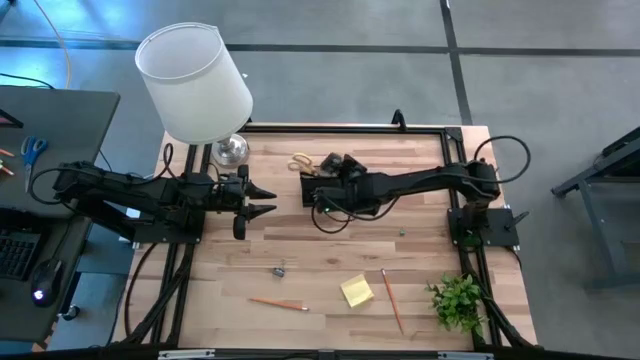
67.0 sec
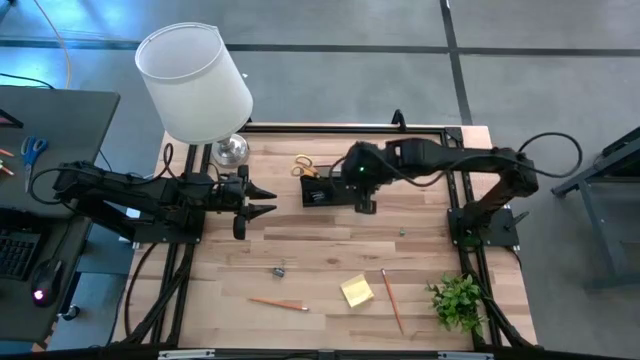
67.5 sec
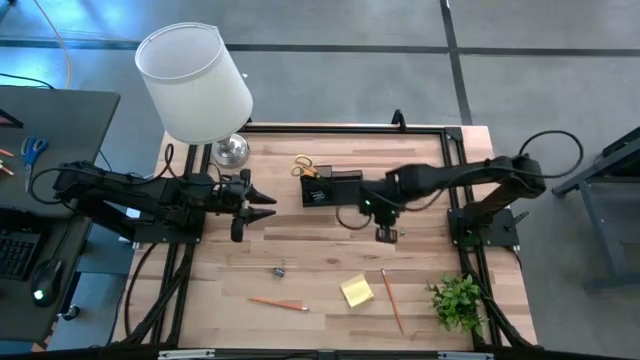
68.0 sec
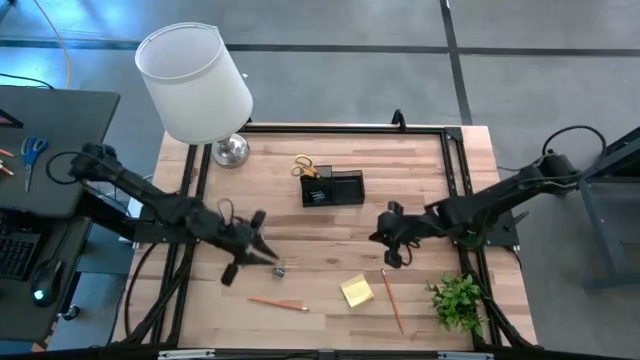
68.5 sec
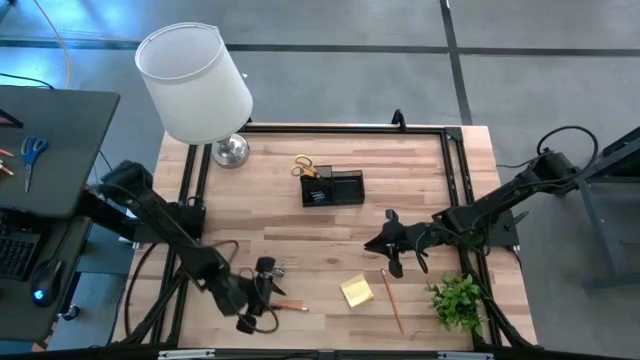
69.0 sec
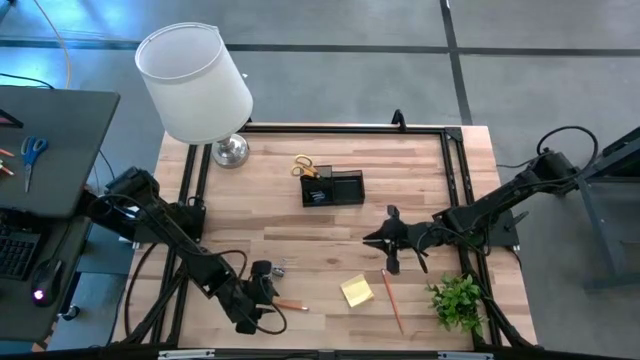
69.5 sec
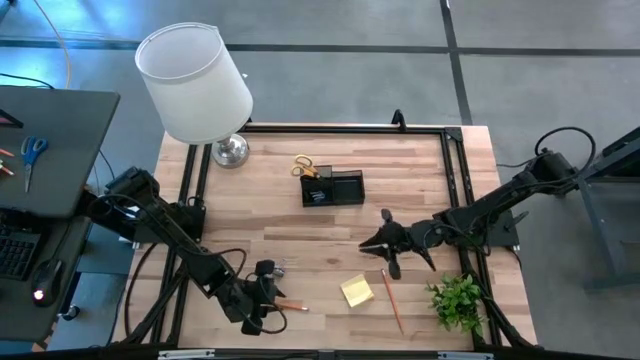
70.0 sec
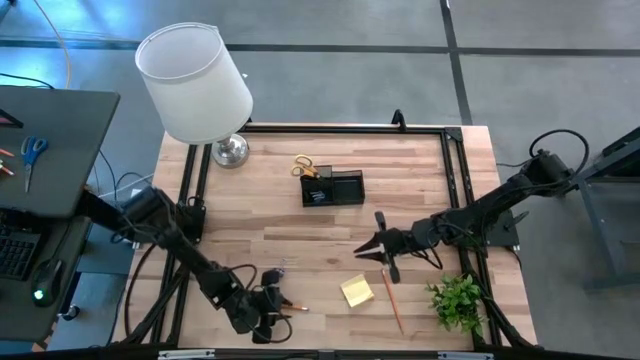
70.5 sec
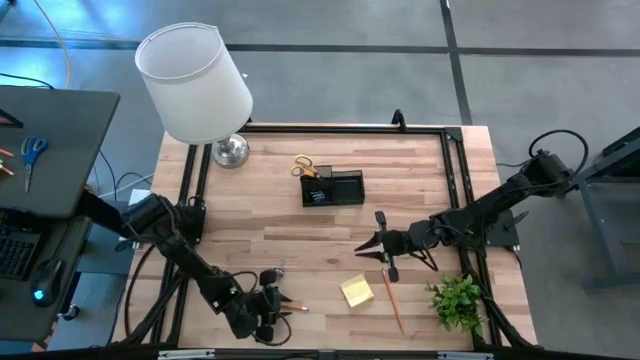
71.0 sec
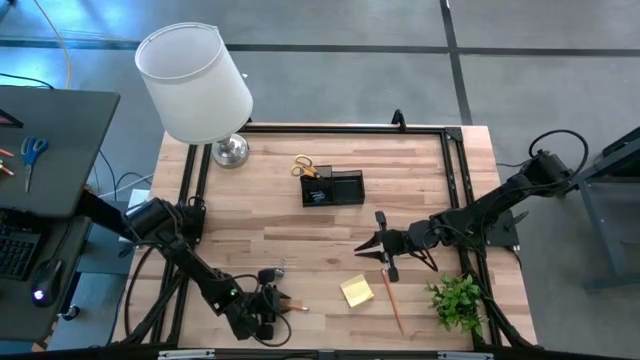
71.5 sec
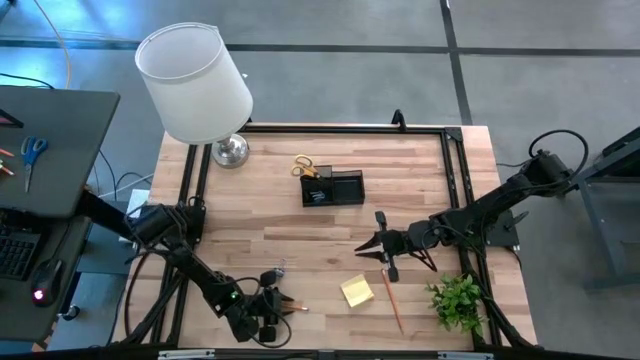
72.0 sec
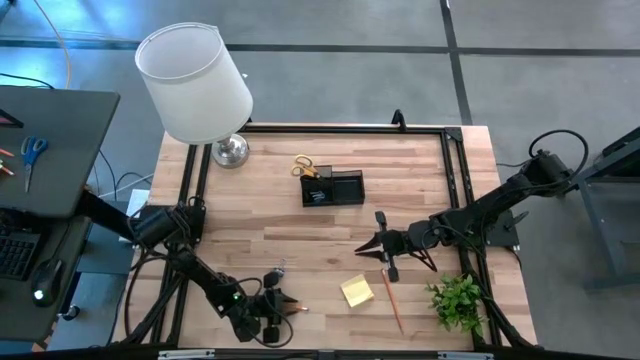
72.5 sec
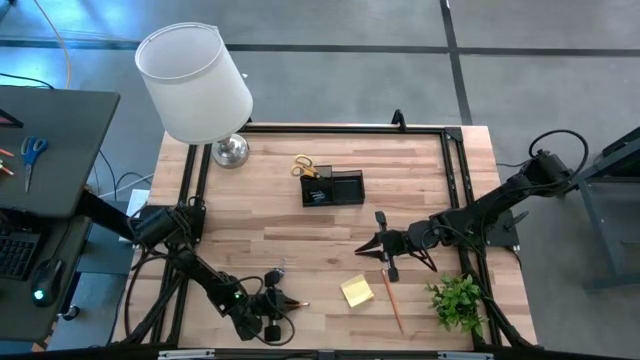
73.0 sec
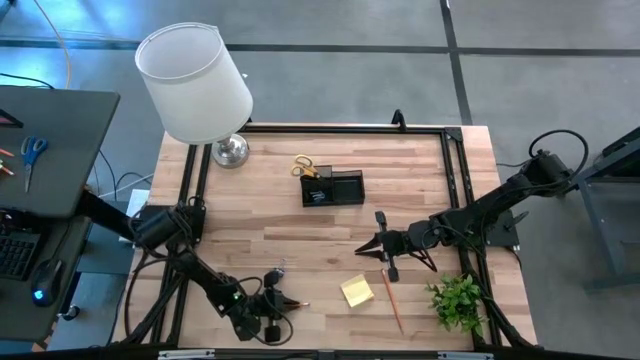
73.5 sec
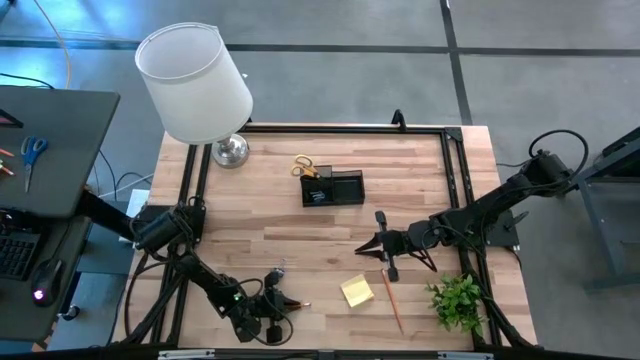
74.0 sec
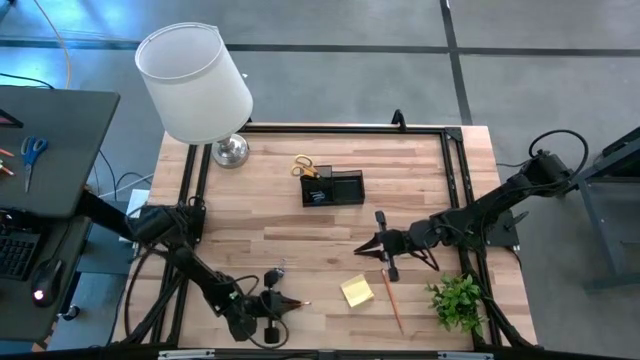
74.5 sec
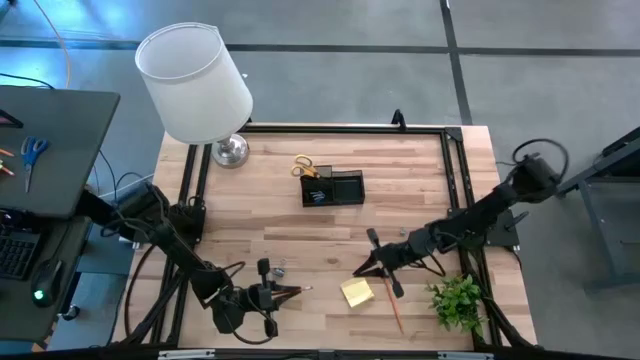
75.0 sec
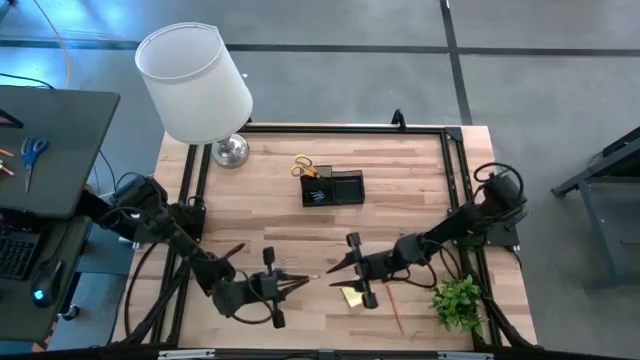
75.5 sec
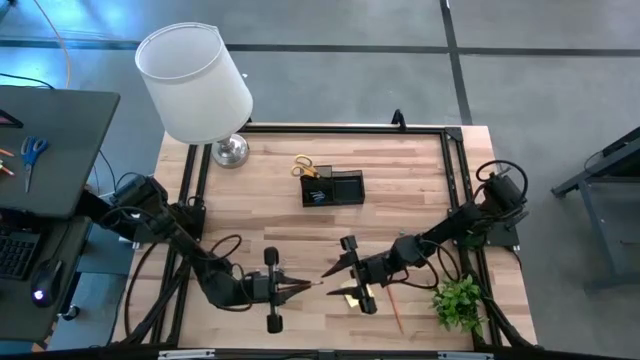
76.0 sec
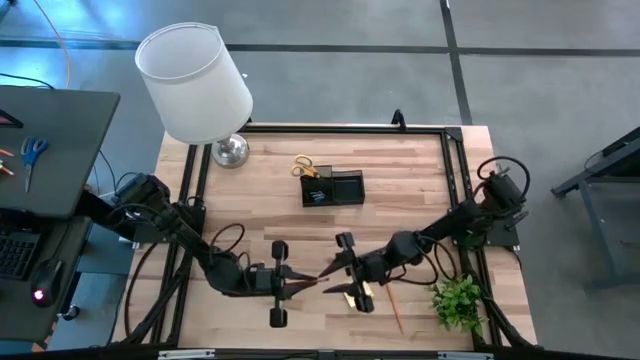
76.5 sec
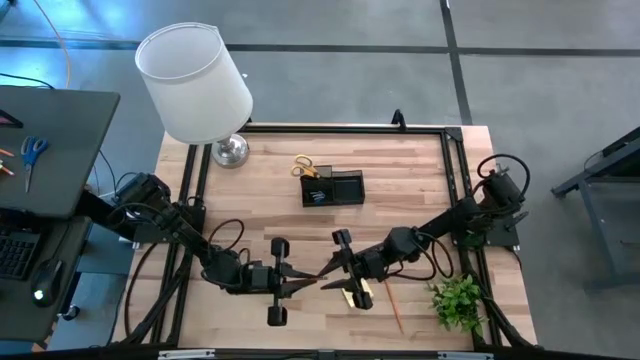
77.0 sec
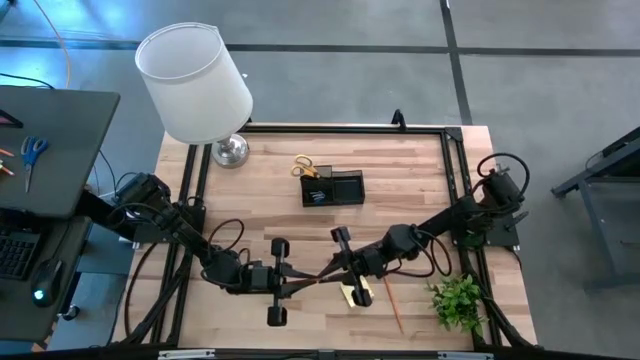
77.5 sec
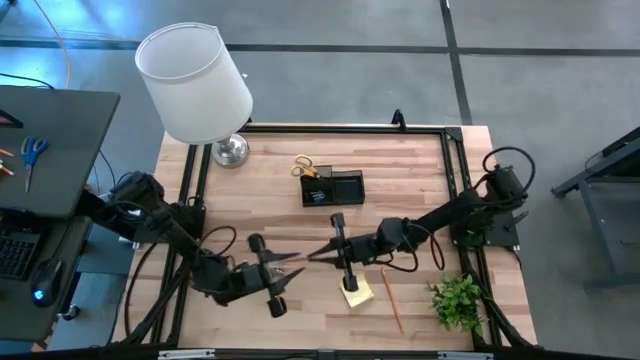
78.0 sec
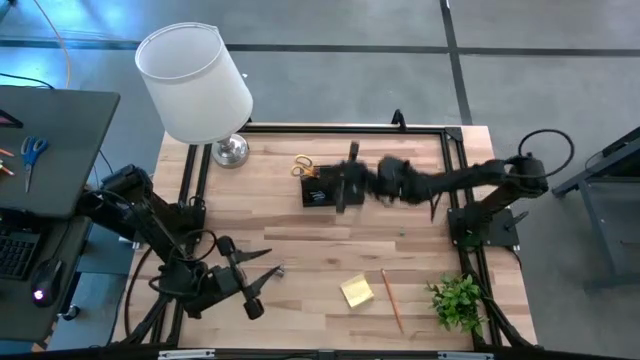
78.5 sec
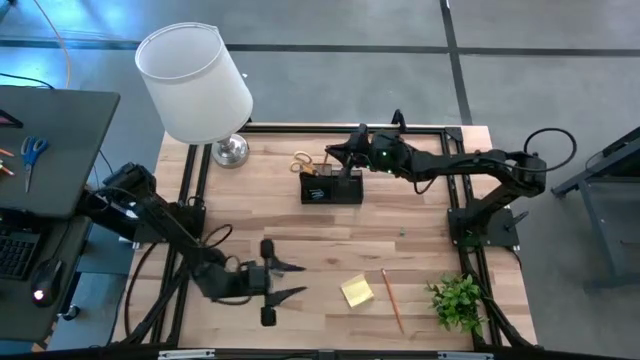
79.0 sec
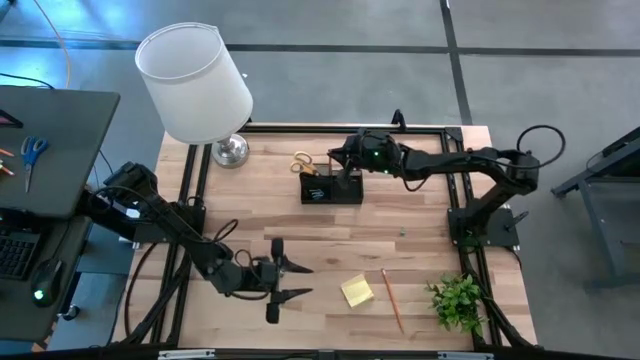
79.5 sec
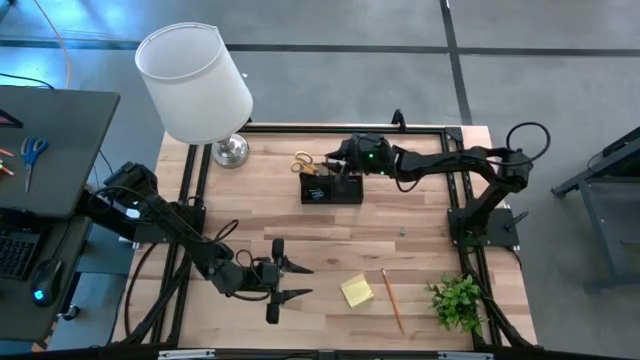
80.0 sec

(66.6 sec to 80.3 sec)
Task: Pick and place office supplies into organizer
Put the left orange pencil into the black desk organizer

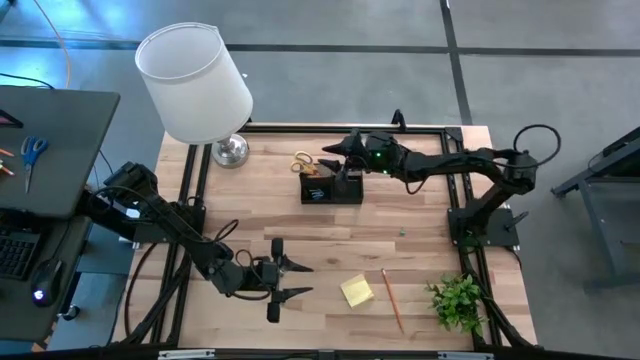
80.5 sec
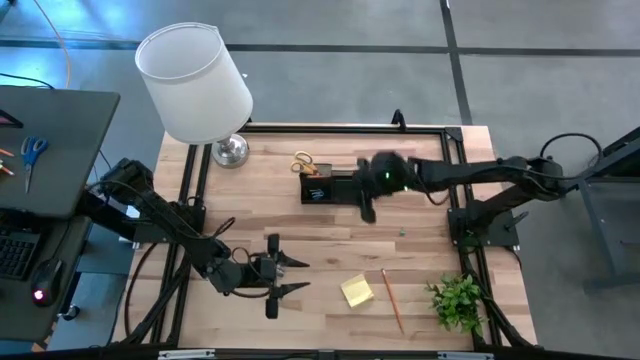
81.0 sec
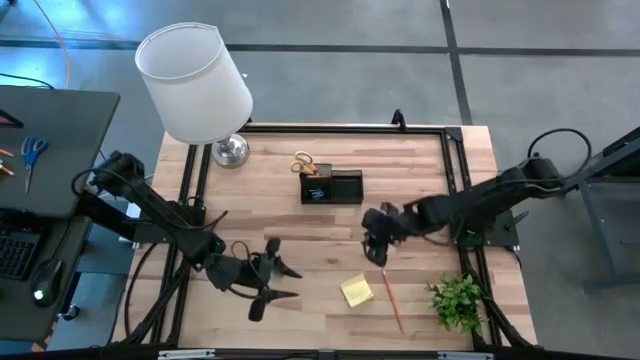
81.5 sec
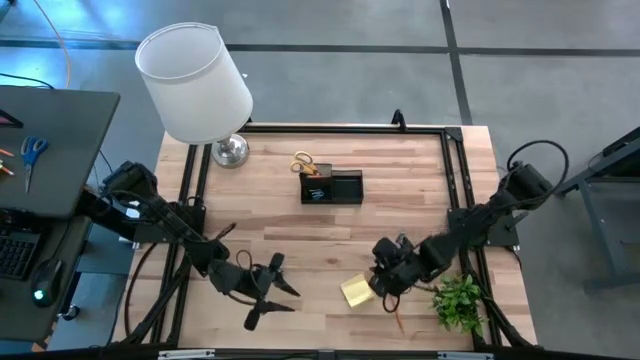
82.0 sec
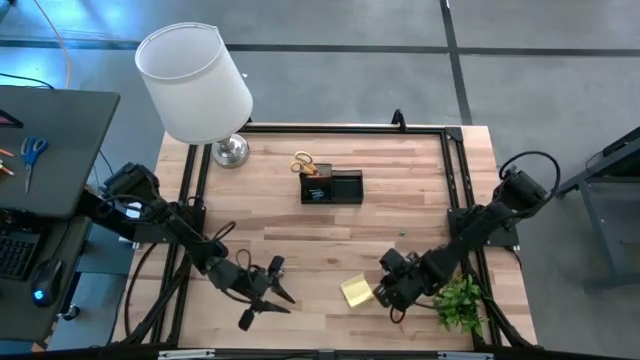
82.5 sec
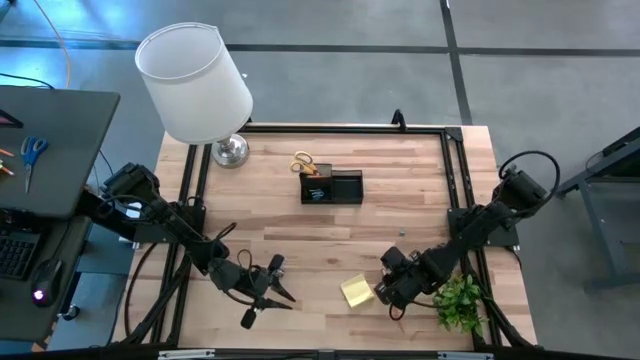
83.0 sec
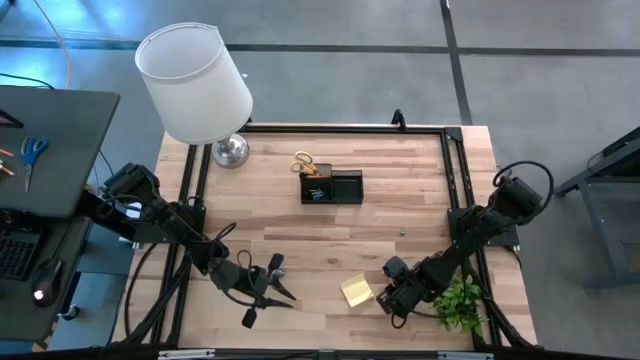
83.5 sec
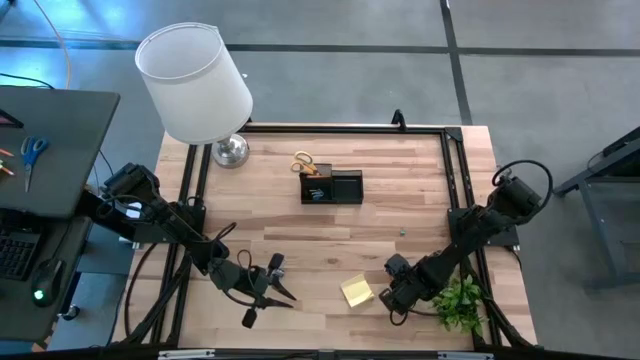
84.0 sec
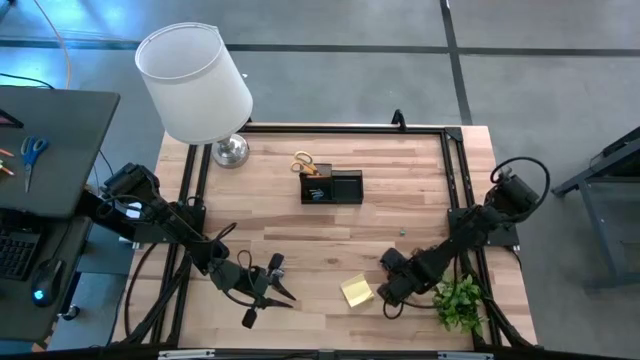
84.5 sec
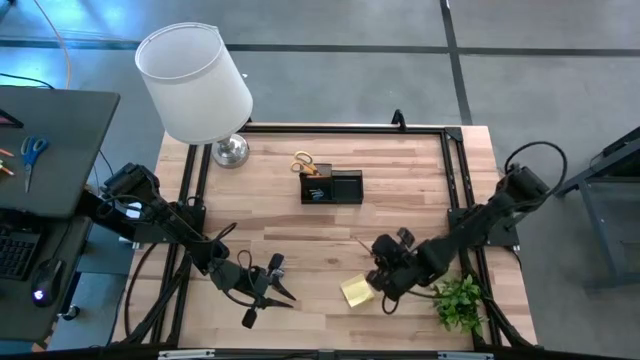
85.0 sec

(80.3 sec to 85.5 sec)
Put the orange pencil into the black desk organizer

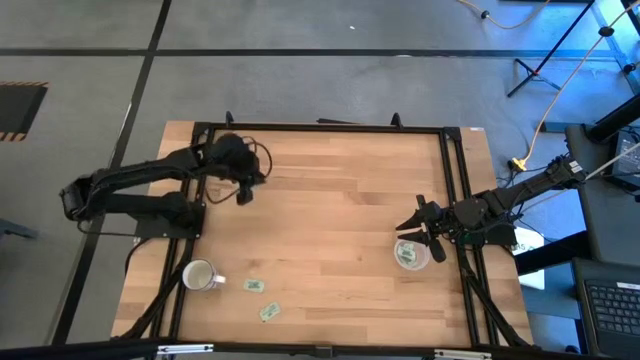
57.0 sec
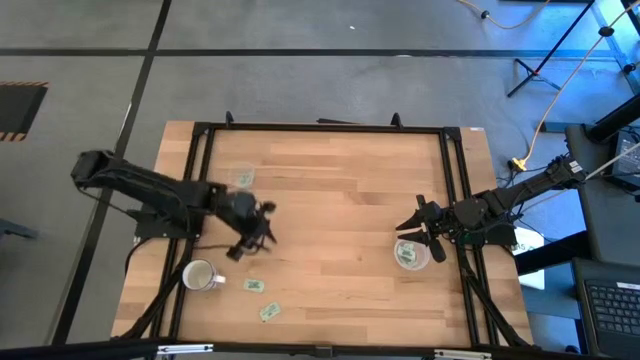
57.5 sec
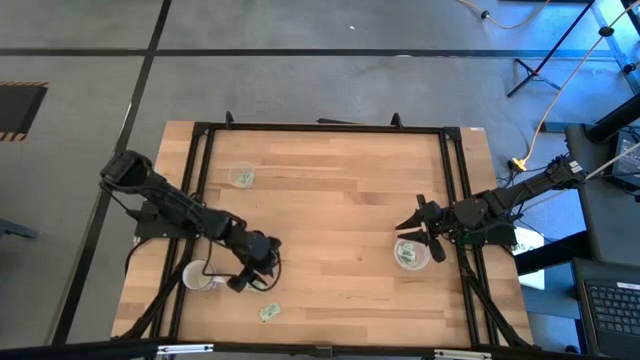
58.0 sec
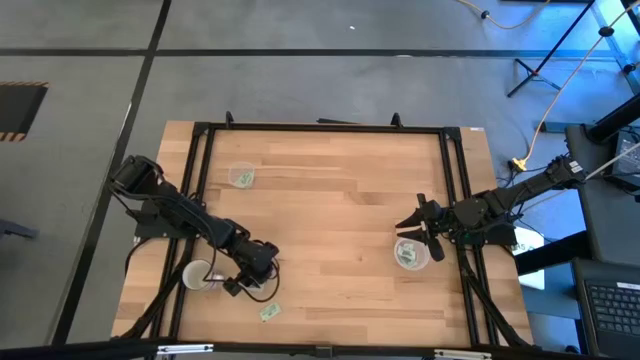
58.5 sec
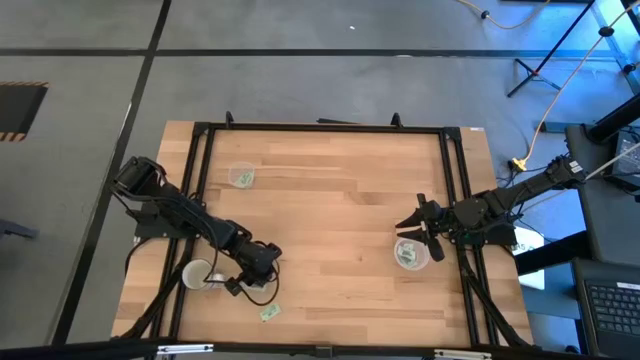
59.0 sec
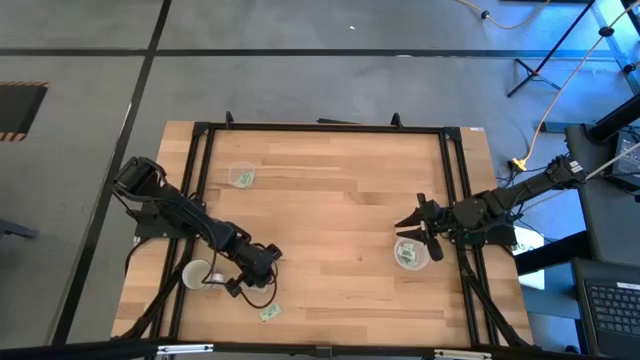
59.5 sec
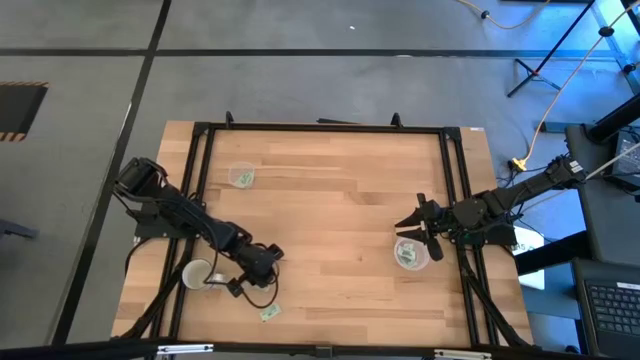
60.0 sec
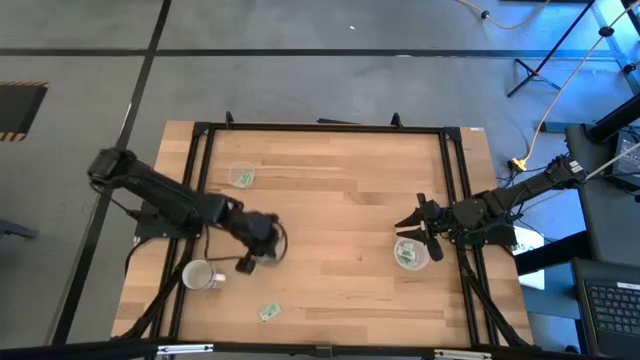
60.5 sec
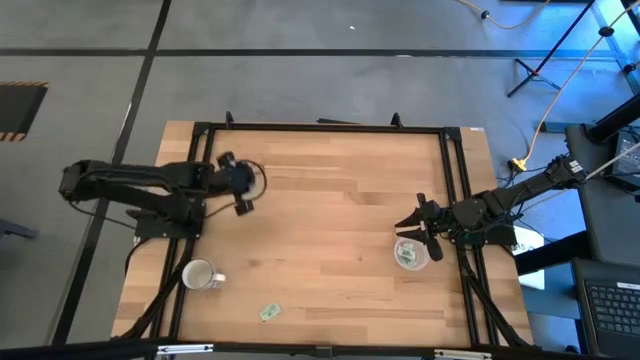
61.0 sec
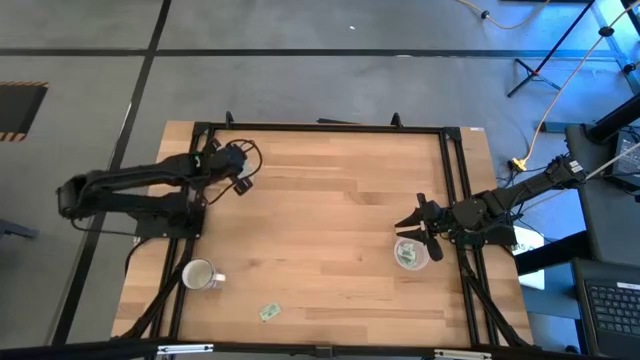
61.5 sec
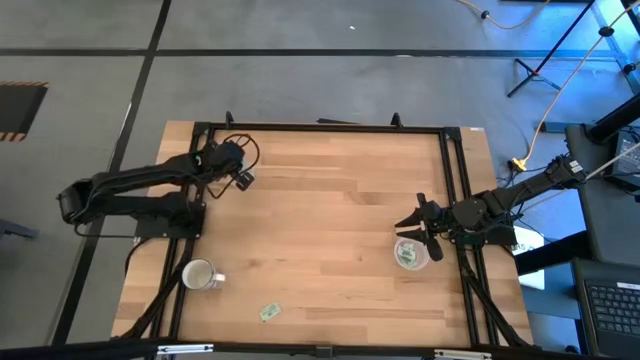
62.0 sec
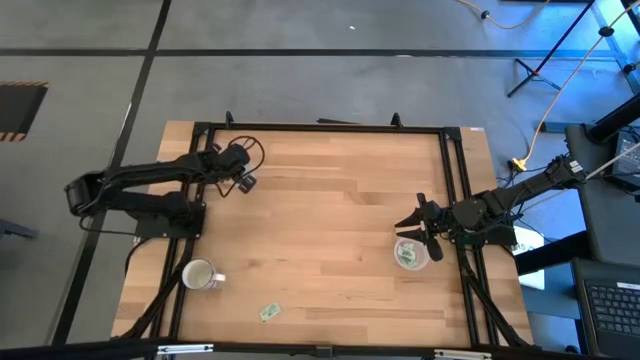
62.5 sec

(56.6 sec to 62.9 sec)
Task: Pick and place Stevia / Truvia into bins
Put the stevia packet into the square transparent container
